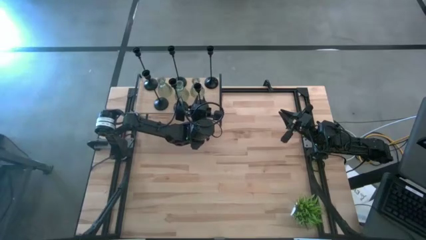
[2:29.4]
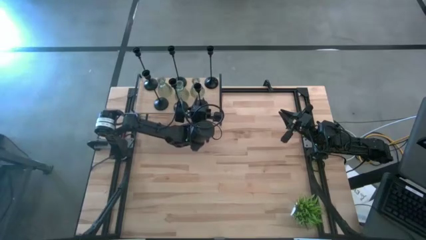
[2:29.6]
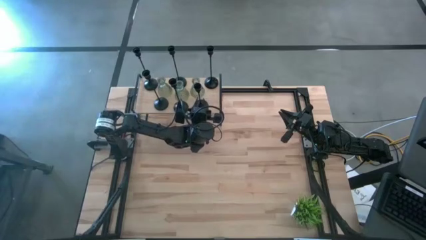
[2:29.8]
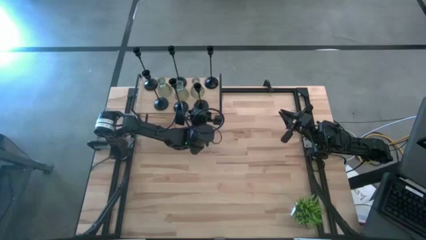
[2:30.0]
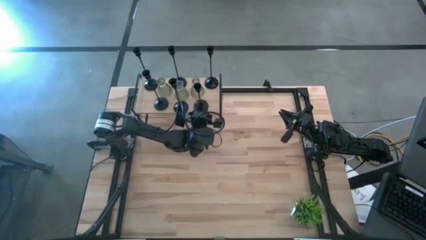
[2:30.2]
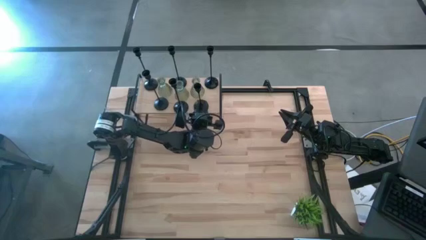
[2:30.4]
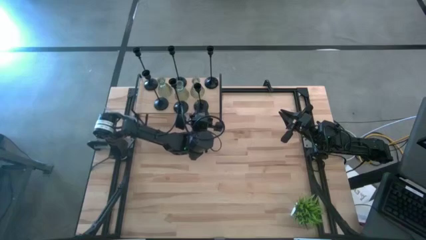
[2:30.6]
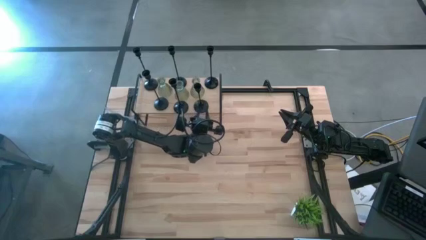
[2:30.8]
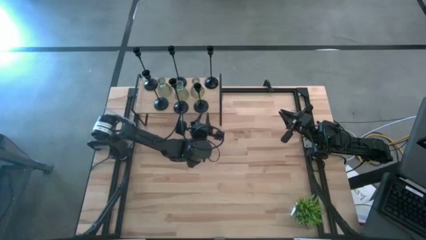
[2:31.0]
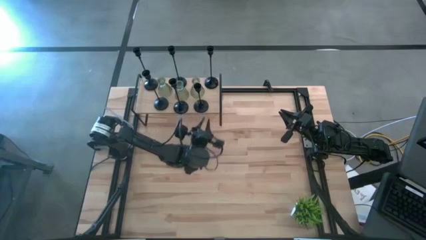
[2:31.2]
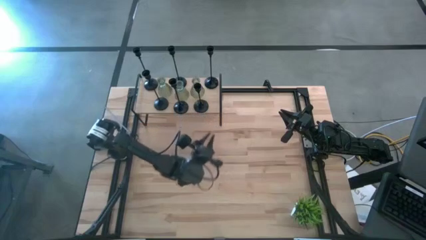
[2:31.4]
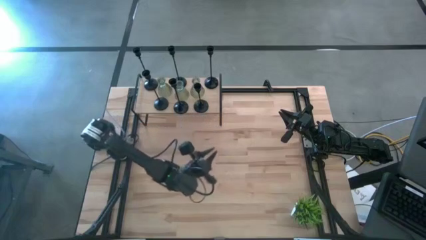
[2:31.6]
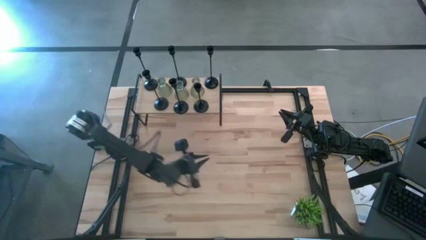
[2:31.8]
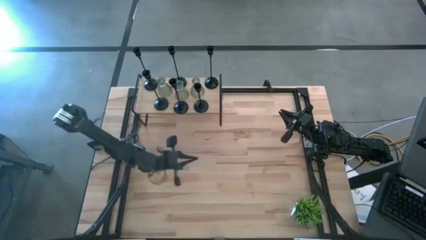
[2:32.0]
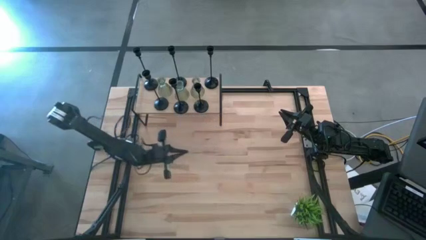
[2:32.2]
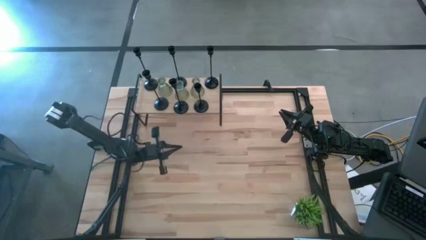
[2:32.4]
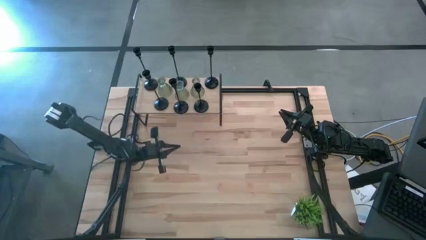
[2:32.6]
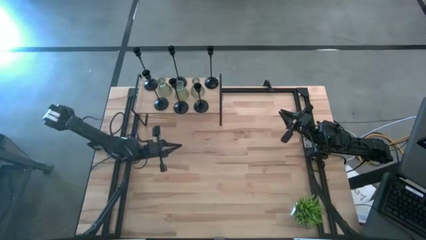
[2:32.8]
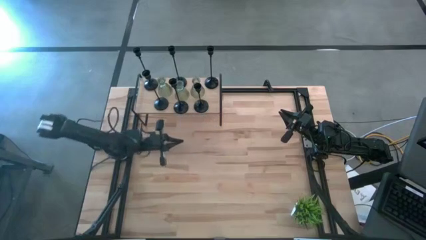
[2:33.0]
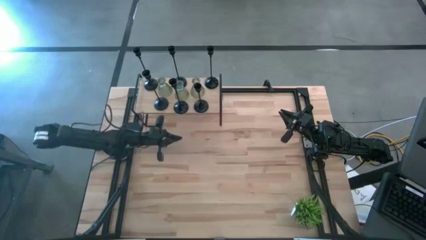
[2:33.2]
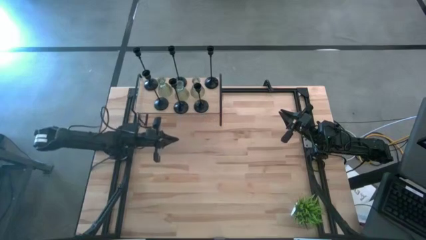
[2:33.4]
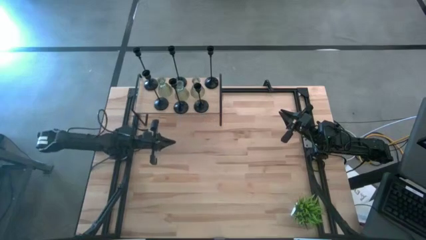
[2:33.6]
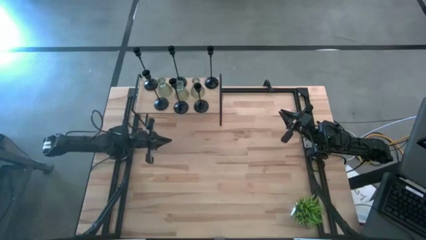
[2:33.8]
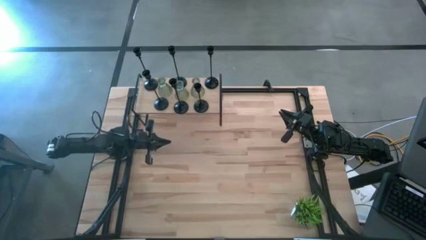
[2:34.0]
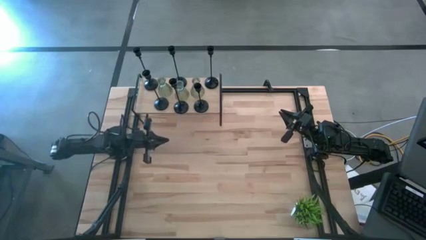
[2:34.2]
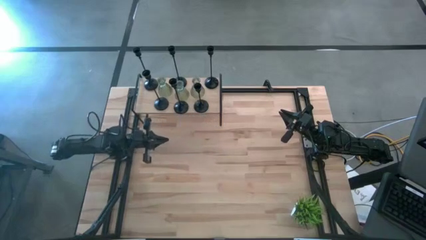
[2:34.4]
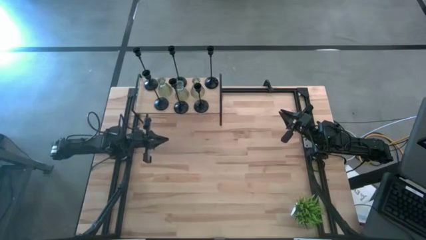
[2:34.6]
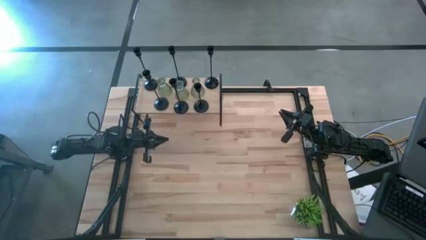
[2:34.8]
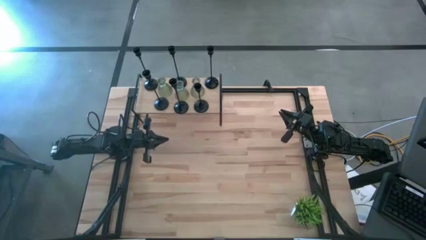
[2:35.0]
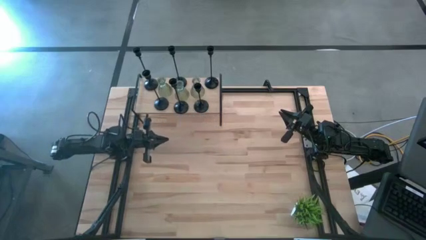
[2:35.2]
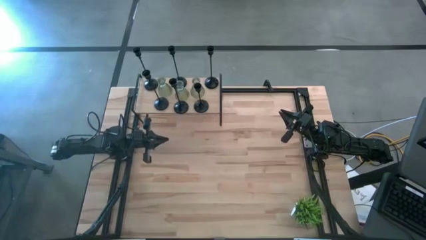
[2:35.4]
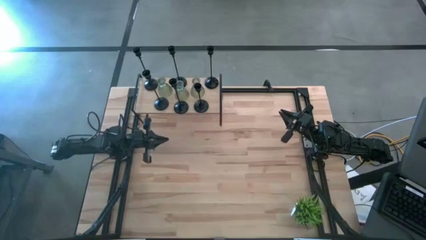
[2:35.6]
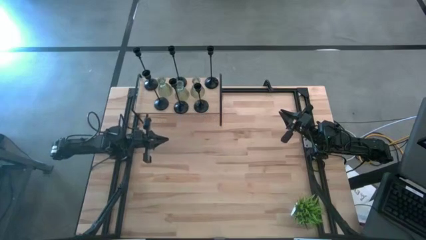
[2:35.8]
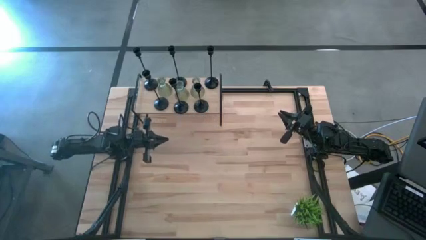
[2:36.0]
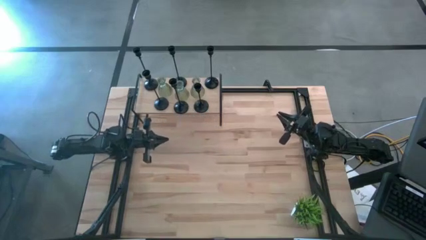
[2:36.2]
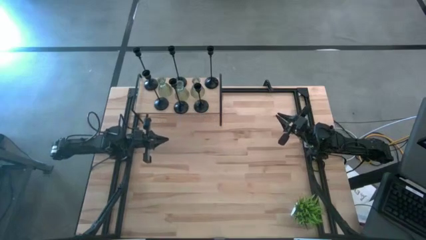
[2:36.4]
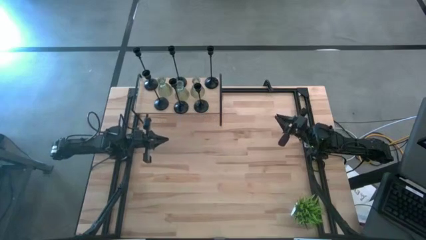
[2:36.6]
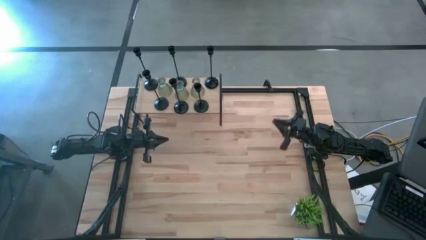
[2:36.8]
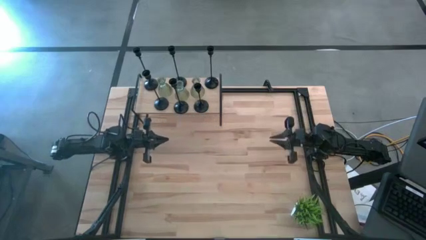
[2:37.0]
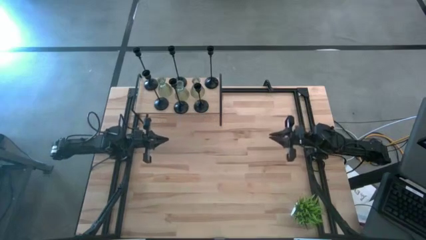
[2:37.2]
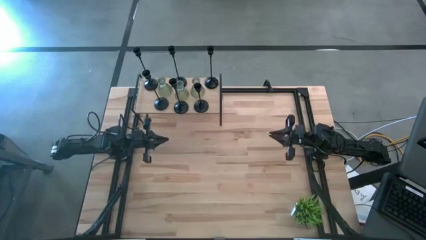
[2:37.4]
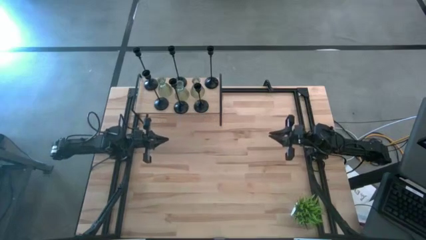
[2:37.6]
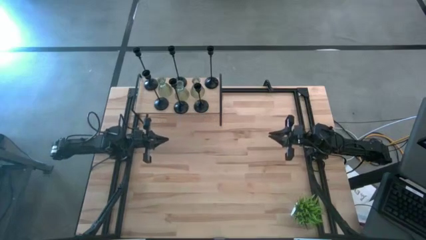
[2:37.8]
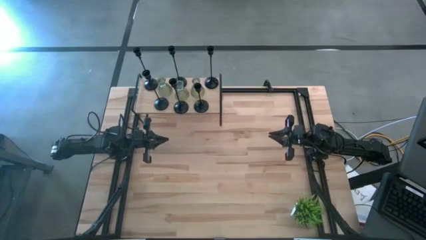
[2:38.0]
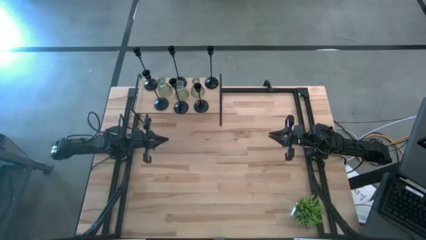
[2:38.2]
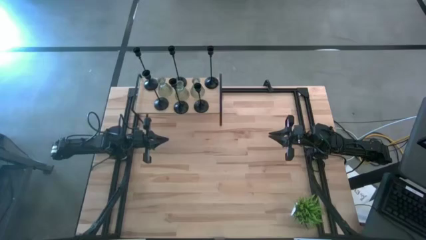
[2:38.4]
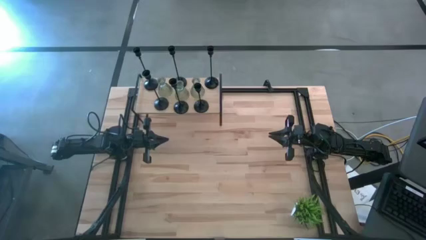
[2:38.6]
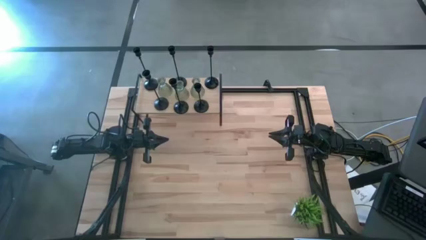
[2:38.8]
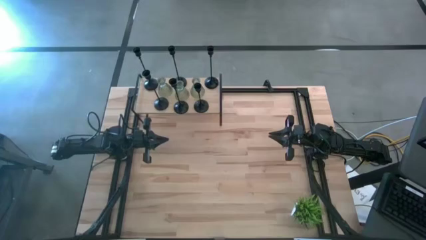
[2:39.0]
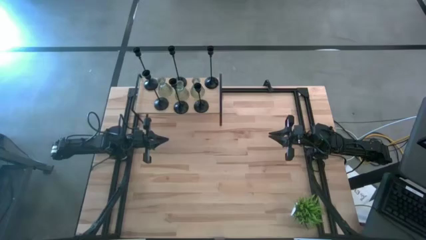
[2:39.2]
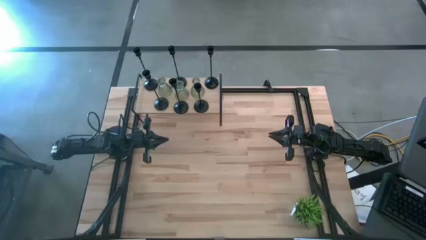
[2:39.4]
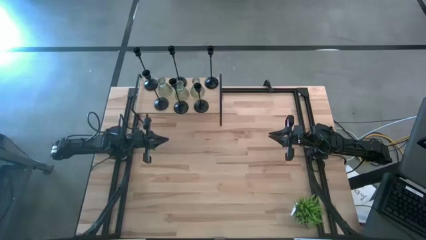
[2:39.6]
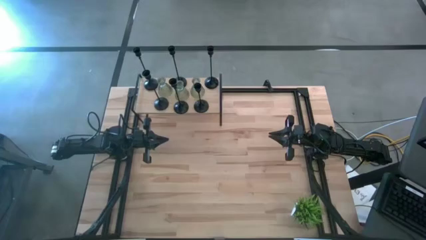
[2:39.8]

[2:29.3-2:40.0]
Task: Pick & Place candle stick holders
Return to Home Position

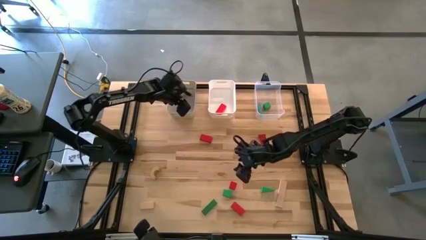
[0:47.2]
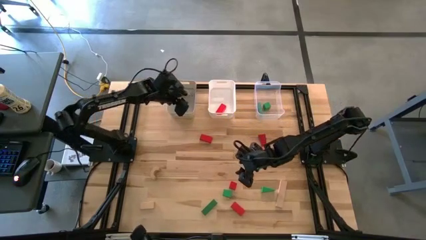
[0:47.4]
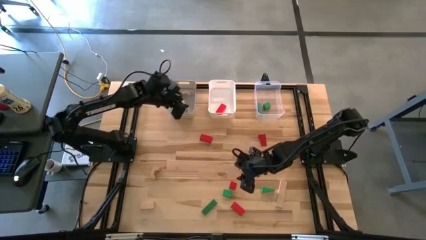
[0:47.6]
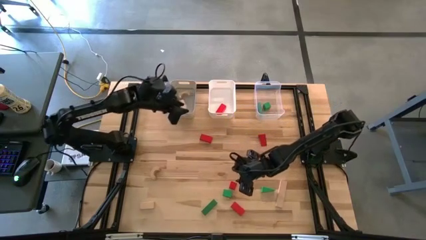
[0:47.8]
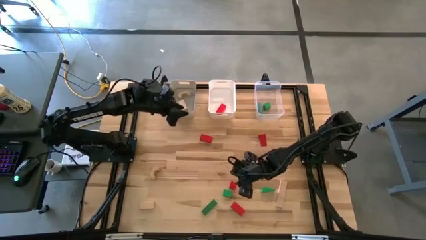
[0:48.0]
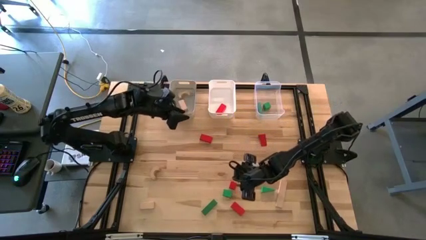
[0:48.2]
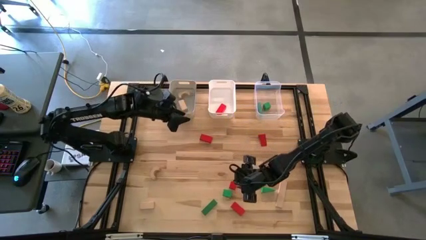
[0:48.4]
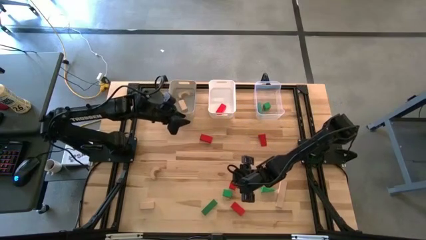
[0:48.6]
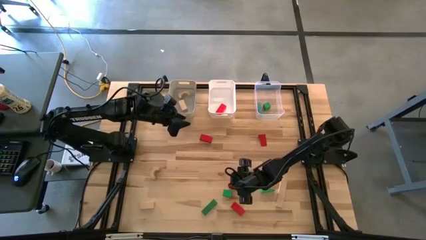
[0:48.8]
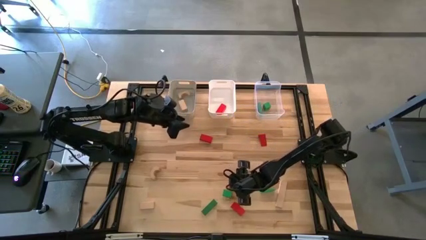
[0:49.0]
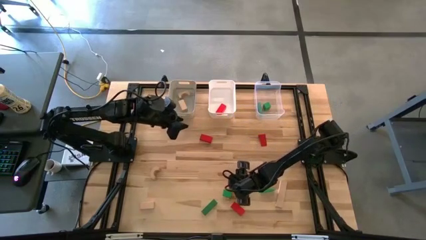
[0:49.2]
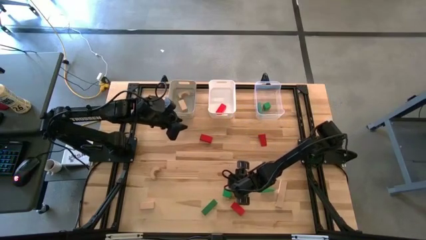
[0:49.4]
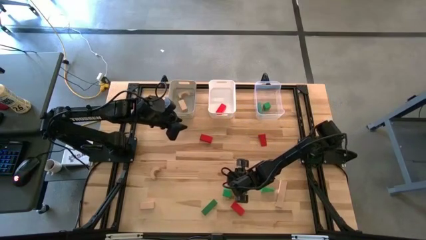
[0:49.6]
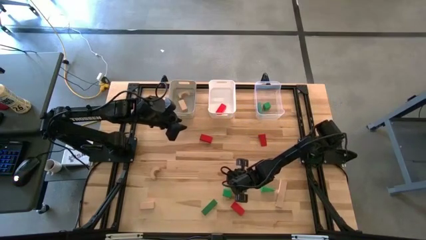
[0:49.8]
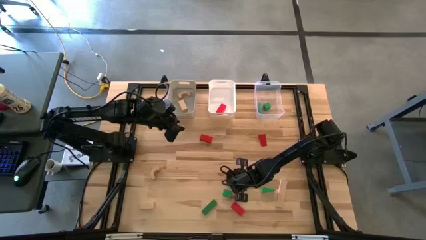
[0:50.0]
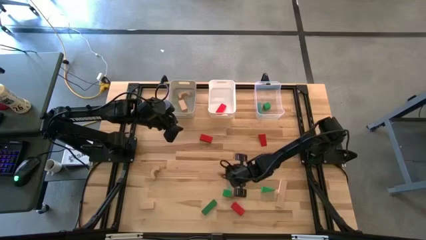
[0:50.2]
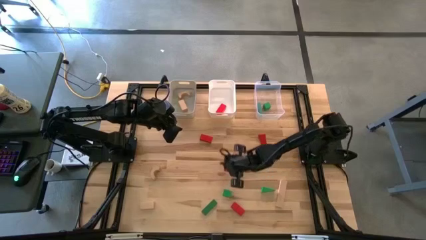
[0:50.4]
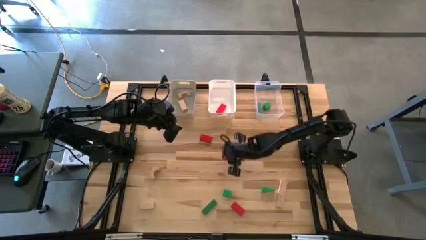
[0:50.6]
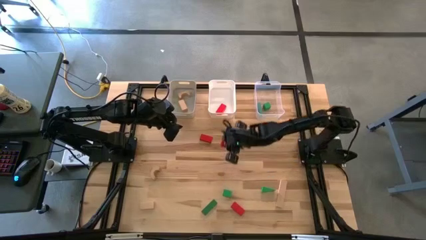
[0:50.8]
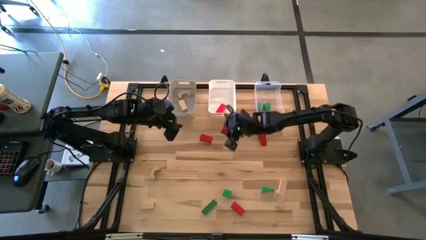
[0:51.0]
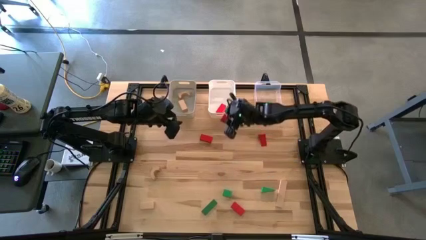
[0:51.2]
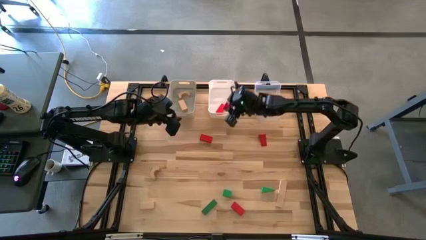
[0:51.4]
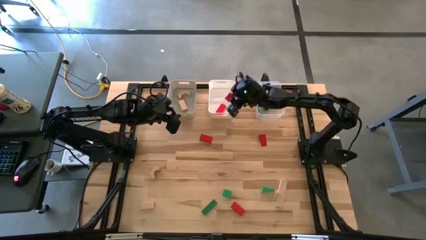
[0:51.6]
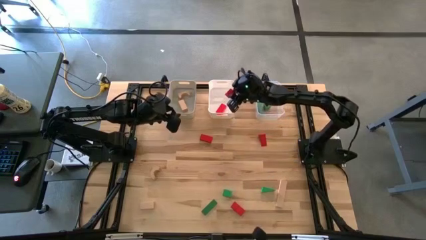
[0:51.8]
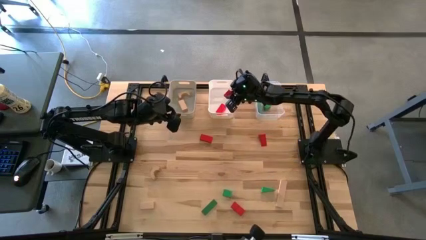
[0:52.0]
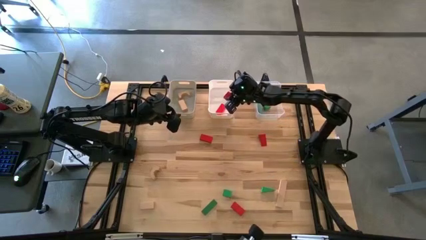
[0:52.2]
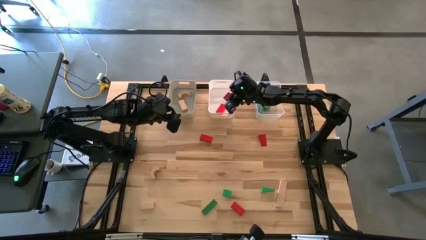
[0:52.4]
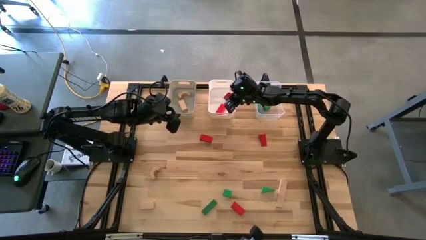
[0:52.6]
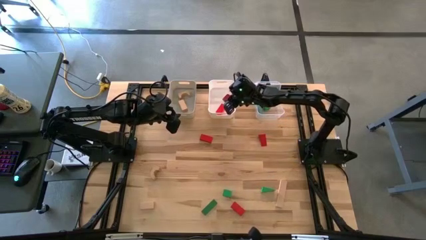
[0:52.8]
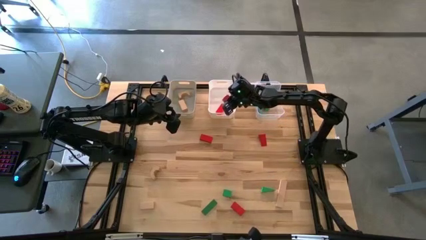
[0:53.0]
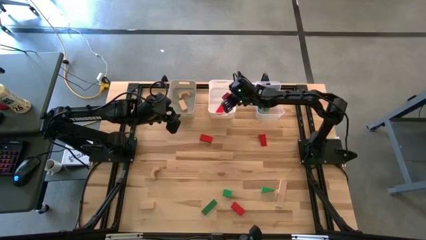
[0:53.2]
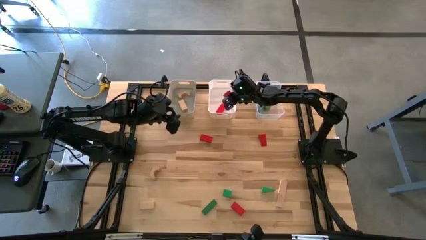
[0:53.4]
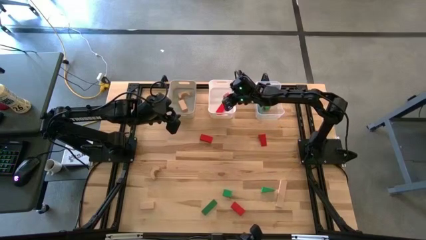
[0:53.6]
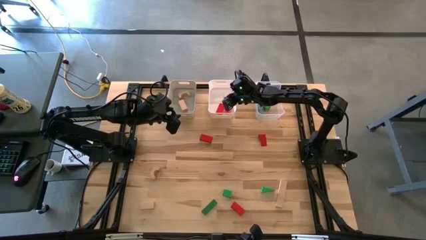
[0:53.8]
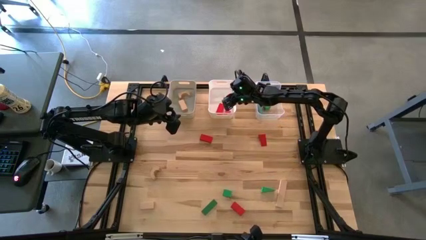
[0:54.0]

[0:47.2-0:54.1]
Task: Sort & place blocks by color
Put the red block into the white bin
